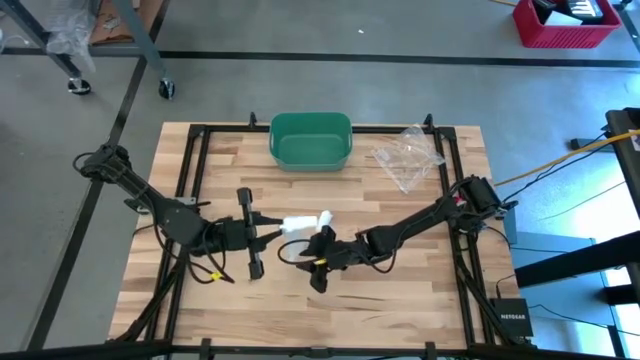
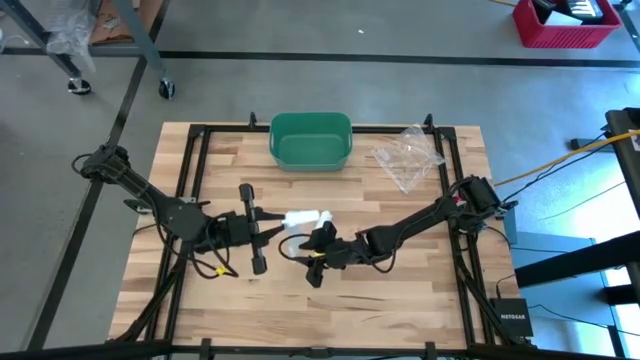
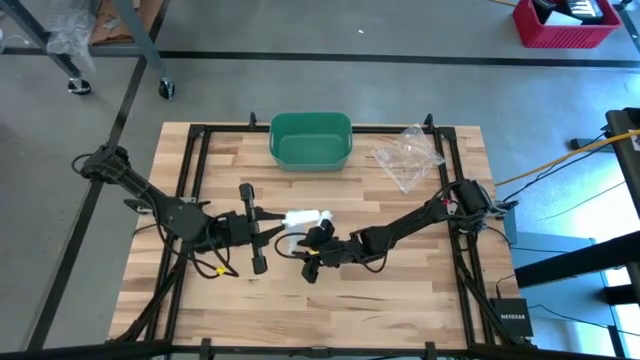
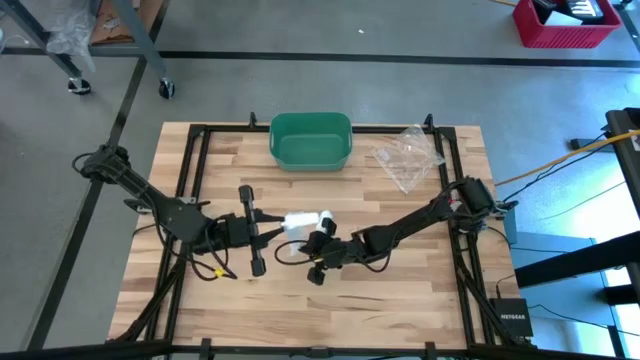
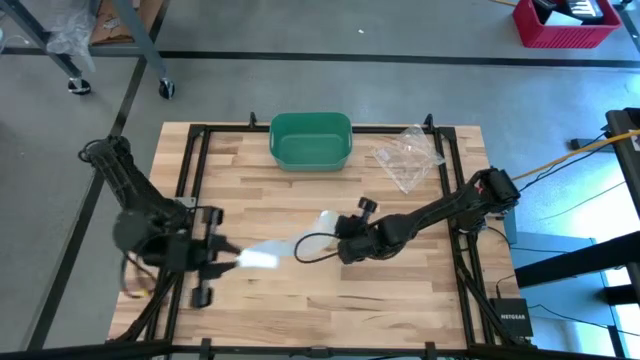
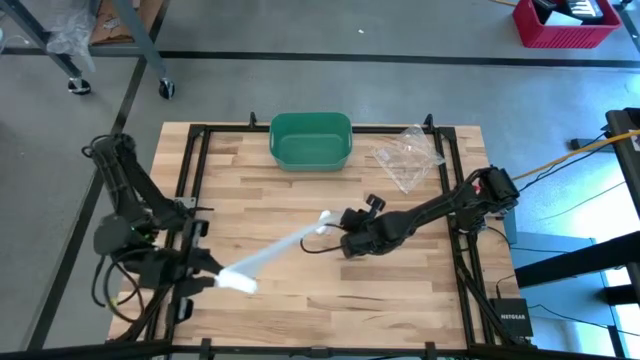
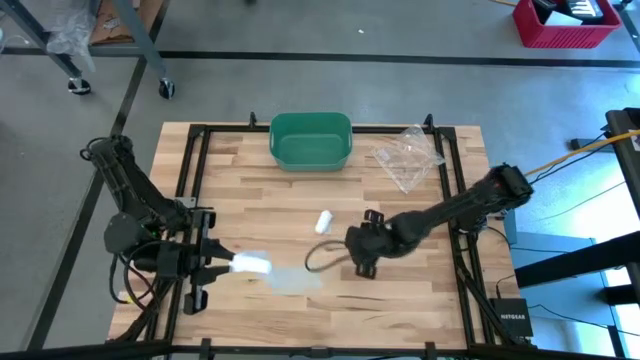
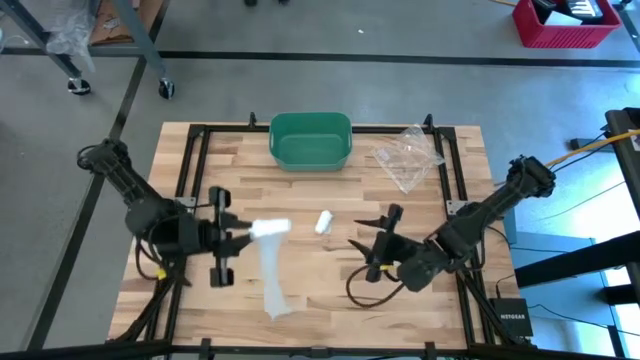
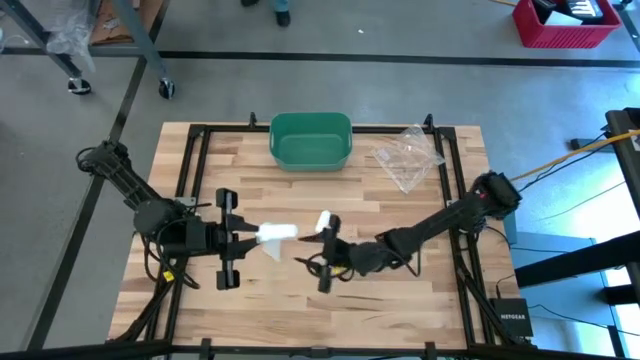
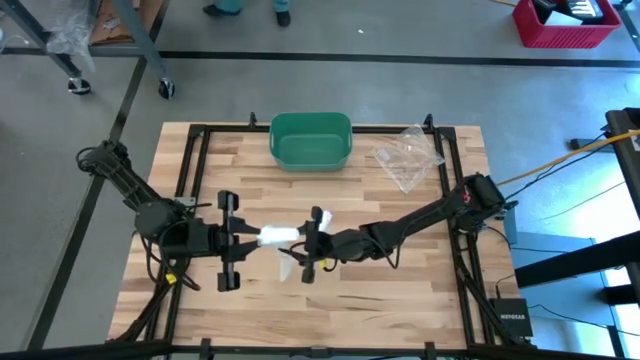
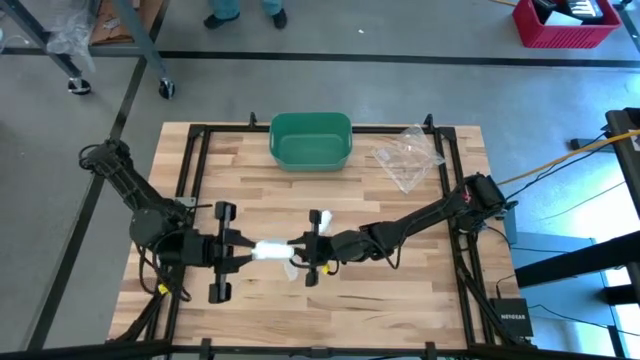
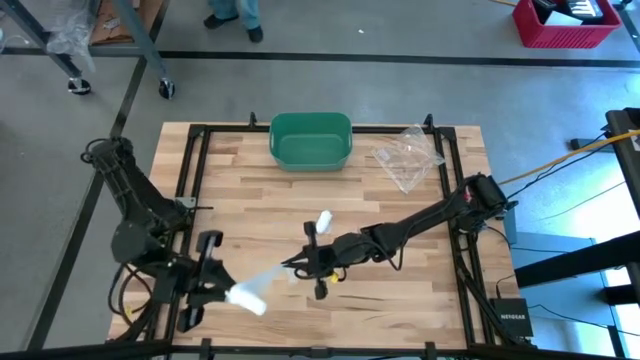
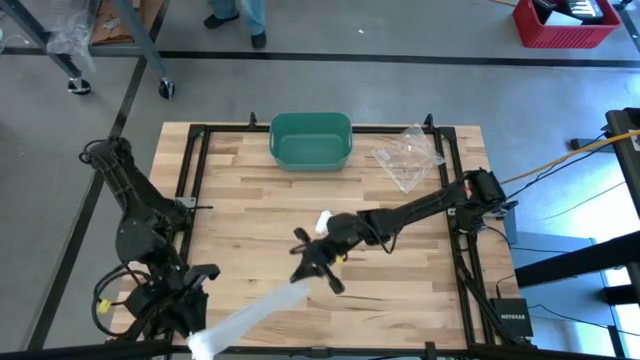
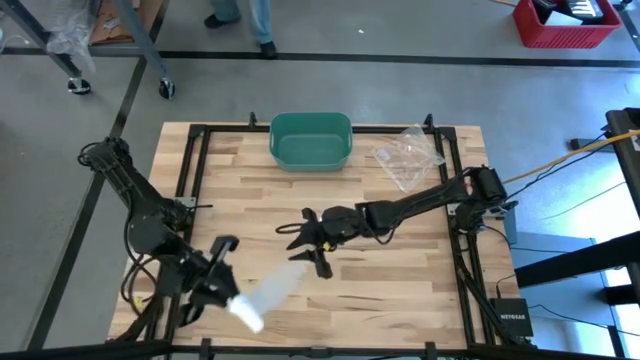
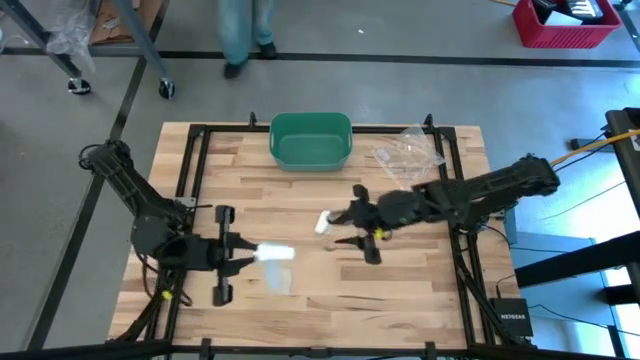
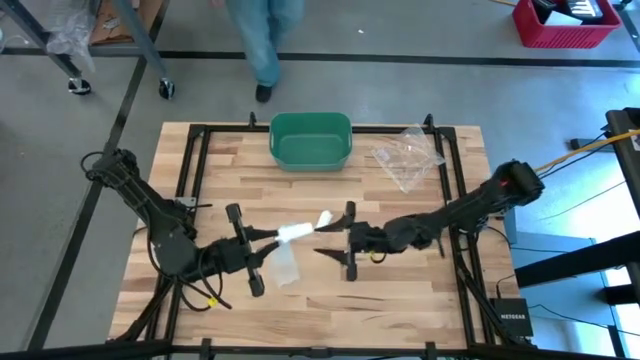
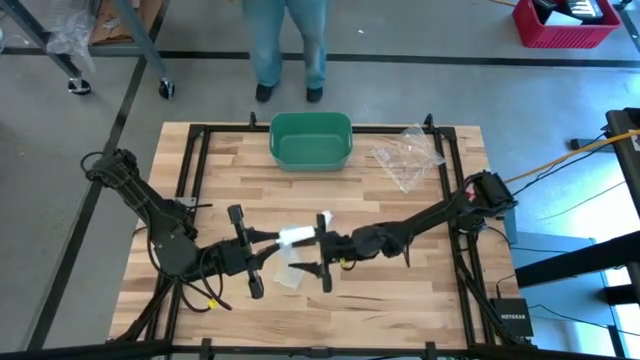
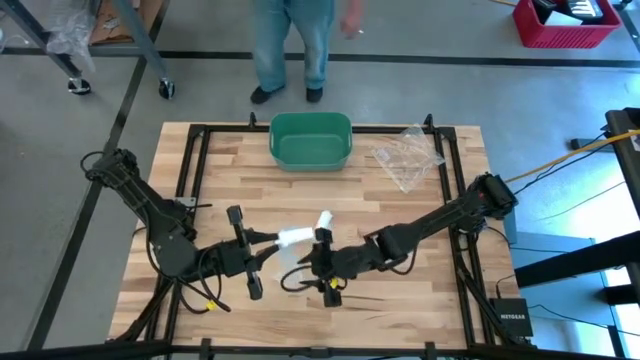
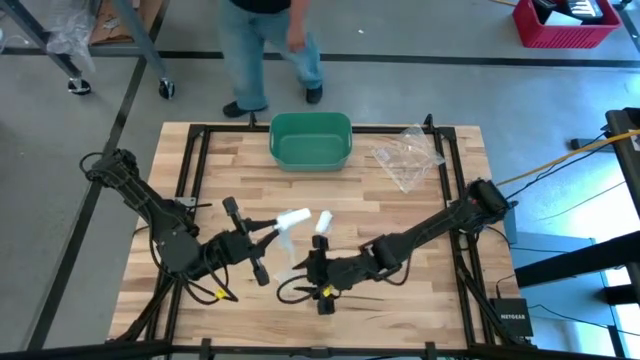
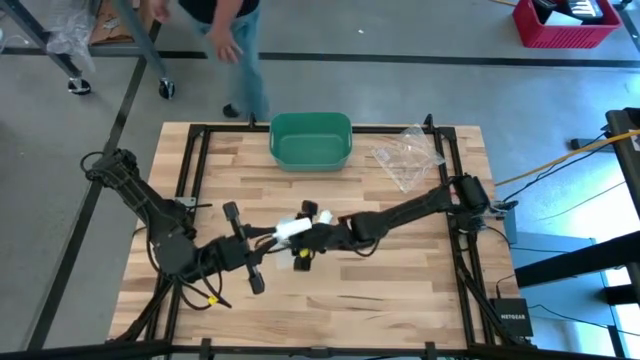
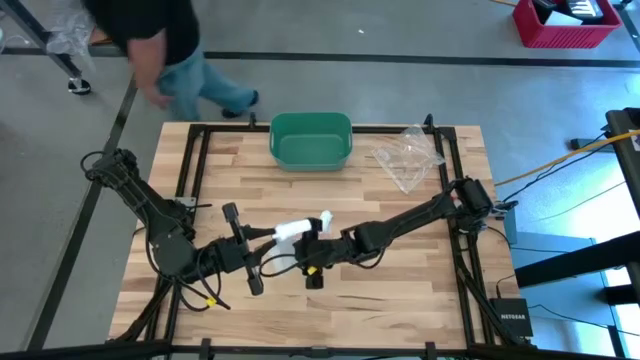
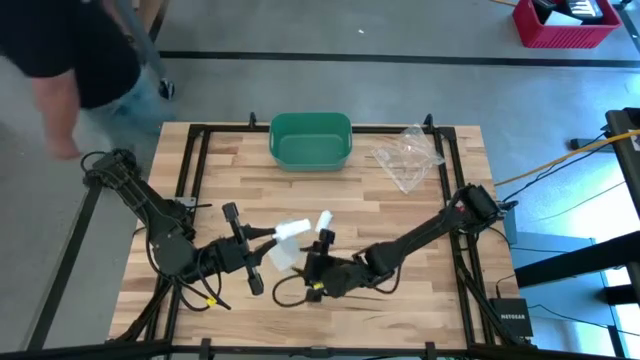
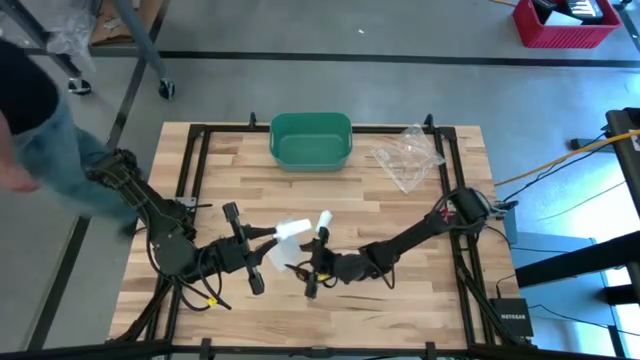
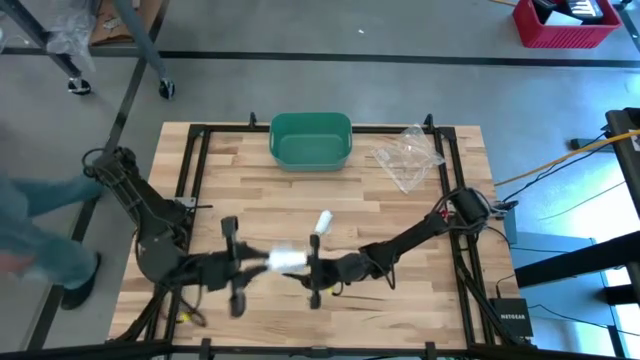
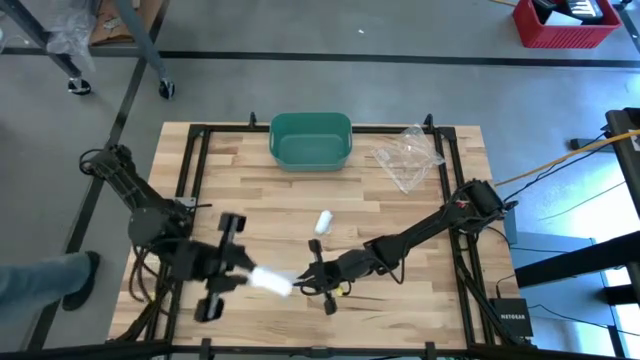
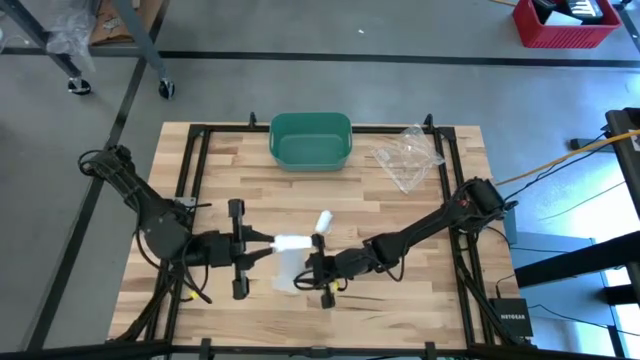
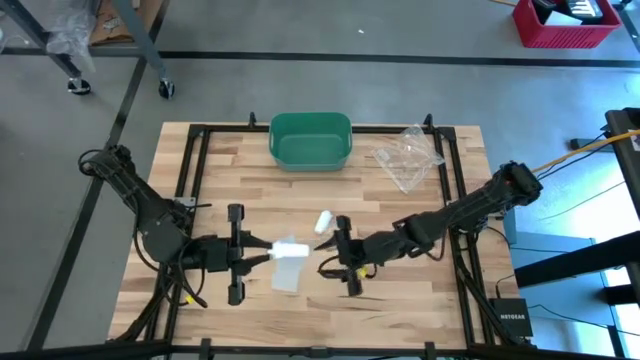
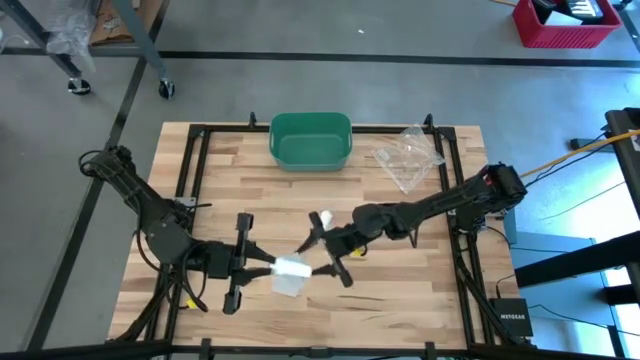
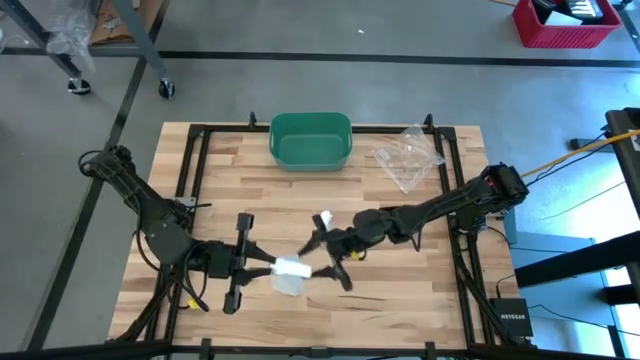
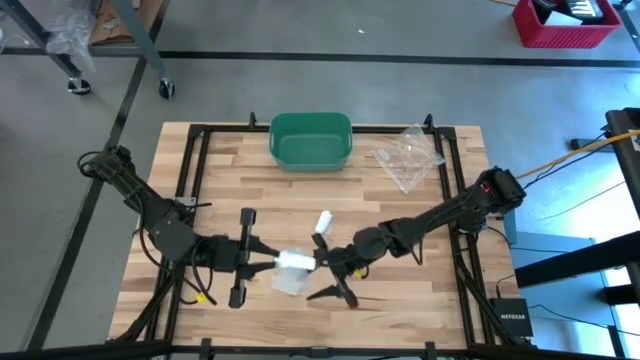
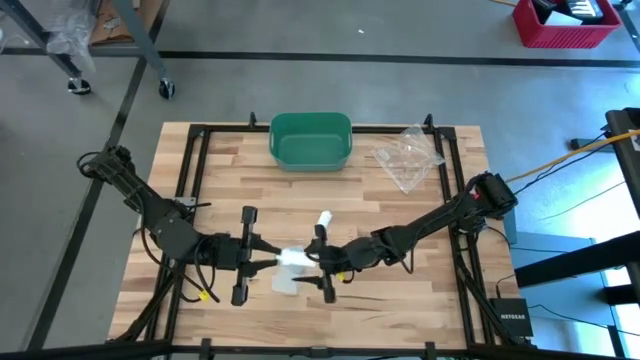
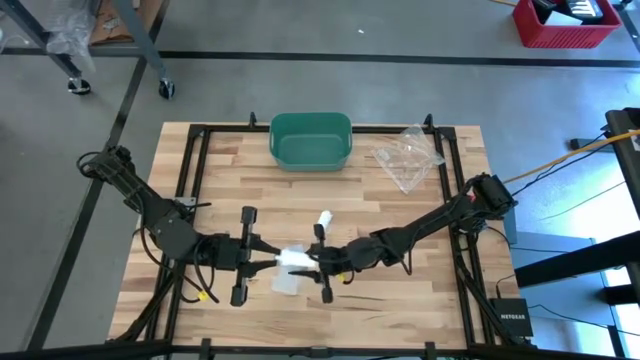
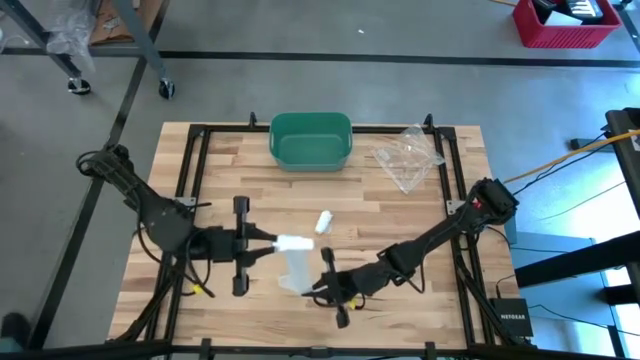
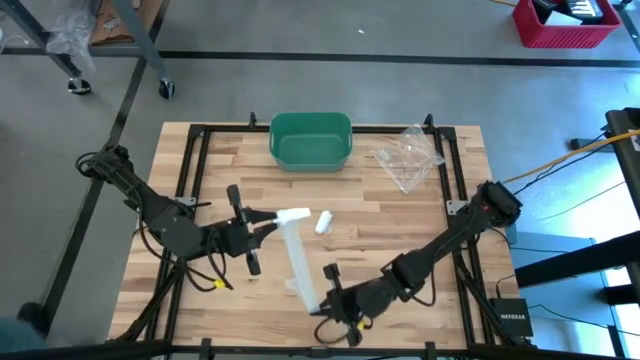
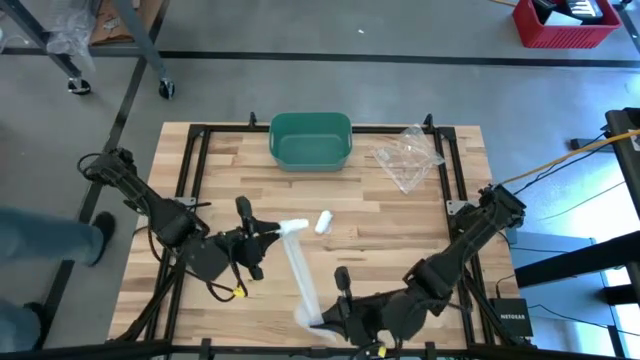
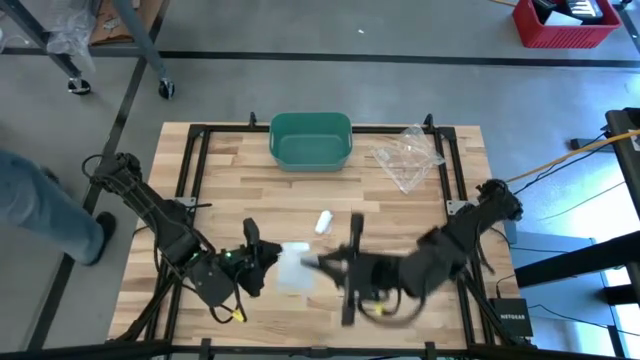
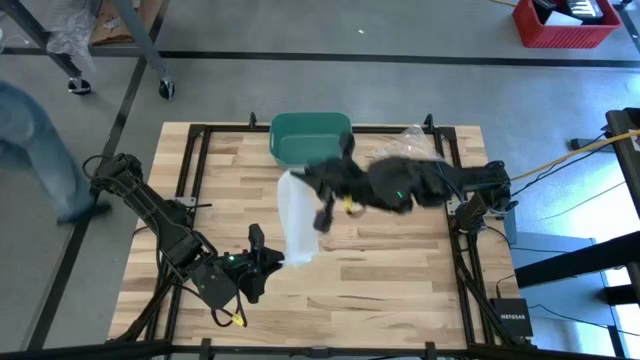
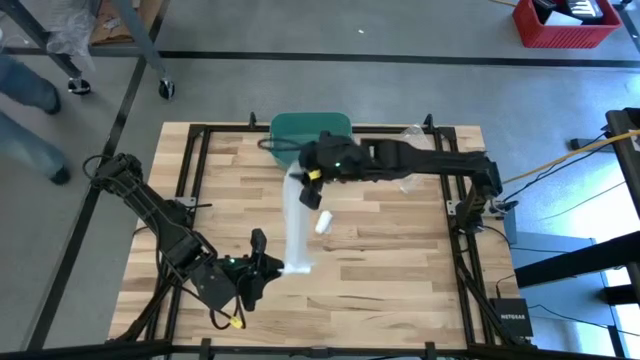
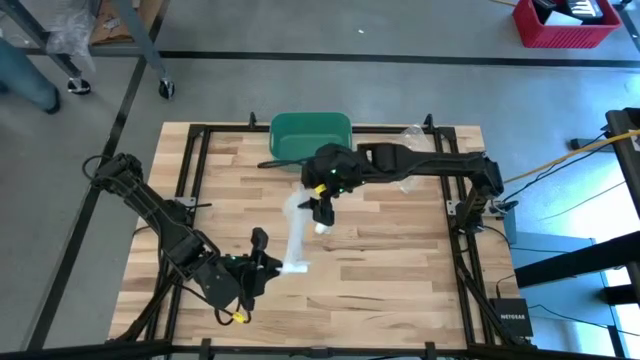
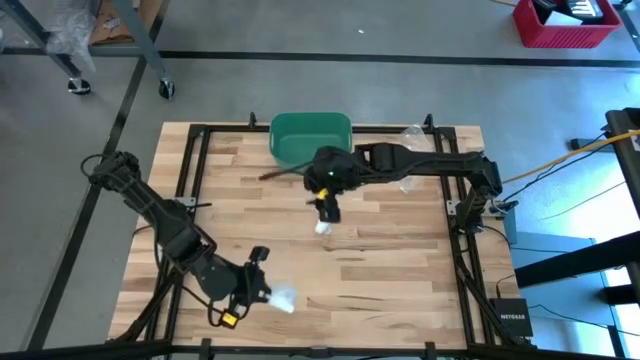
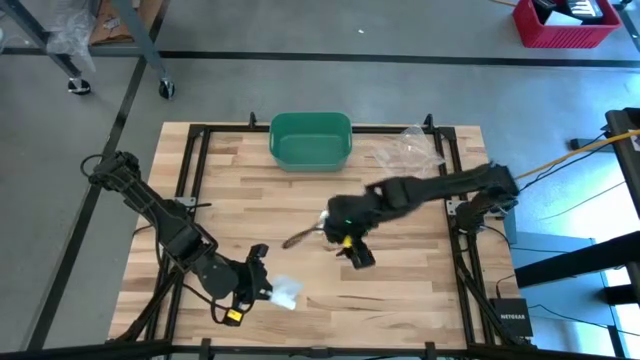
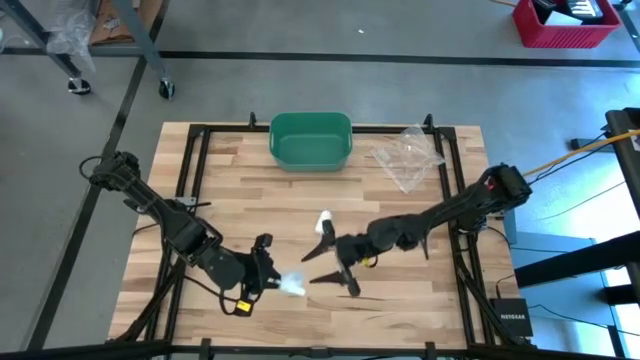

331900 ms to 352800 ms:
Task: Roll bandage
Roll the bottom white bandage
